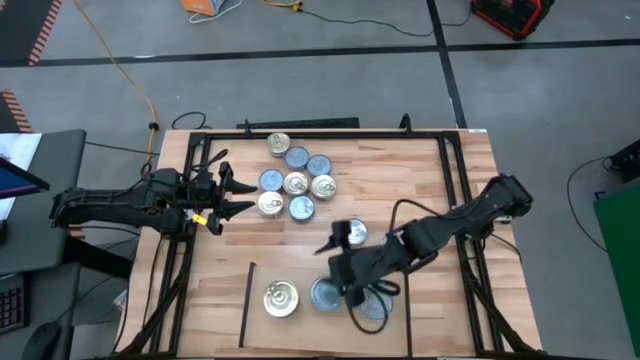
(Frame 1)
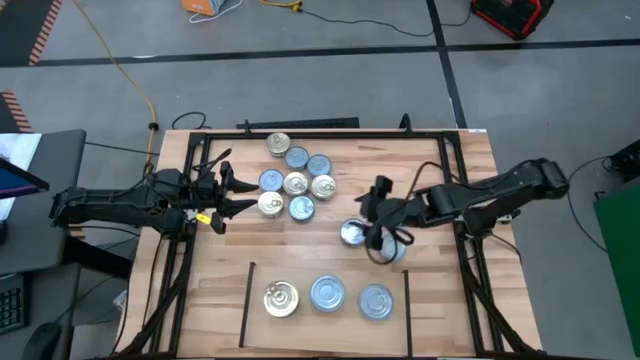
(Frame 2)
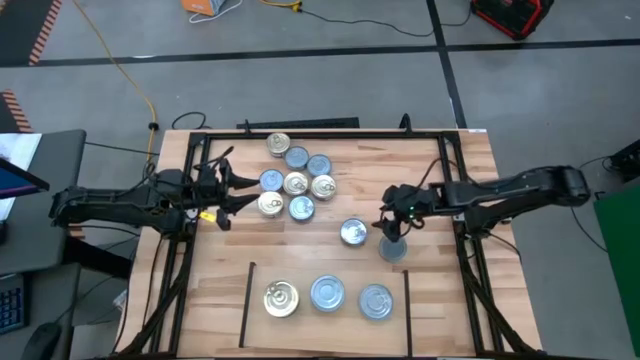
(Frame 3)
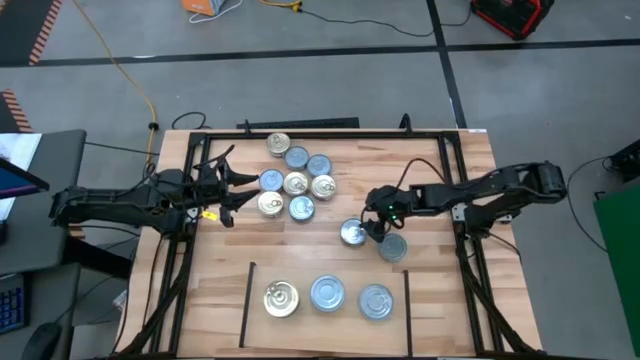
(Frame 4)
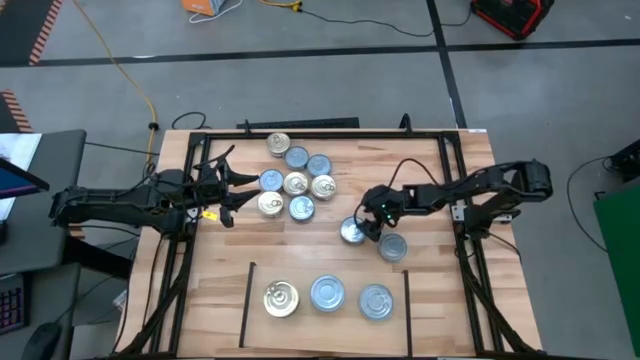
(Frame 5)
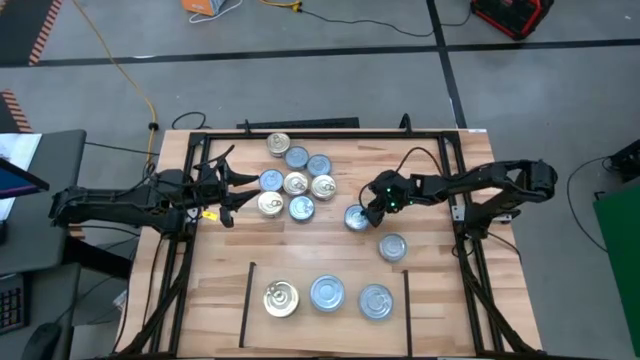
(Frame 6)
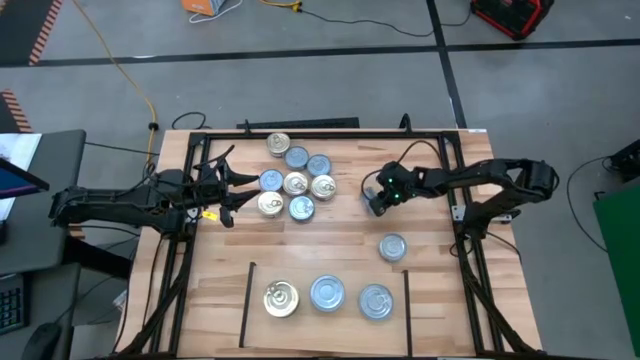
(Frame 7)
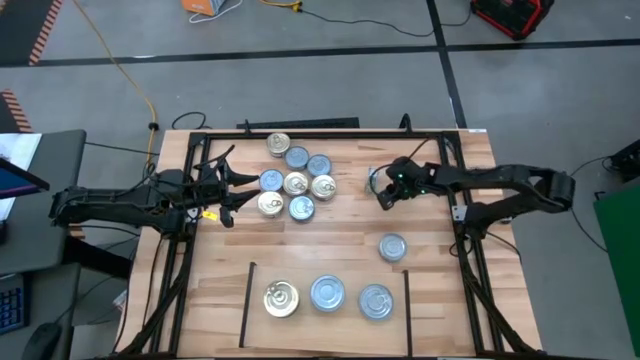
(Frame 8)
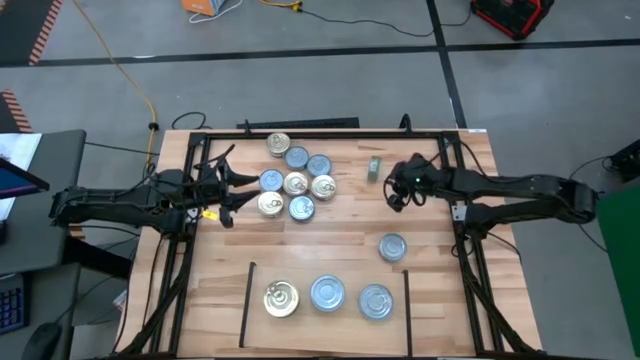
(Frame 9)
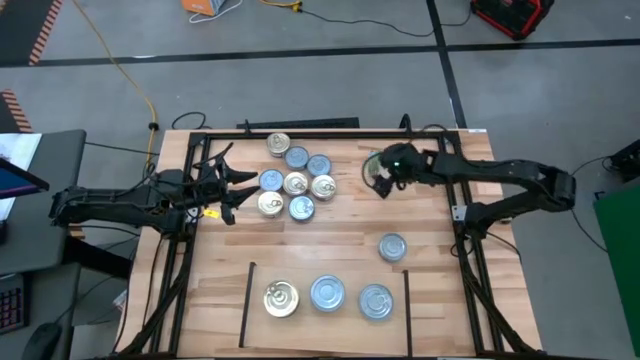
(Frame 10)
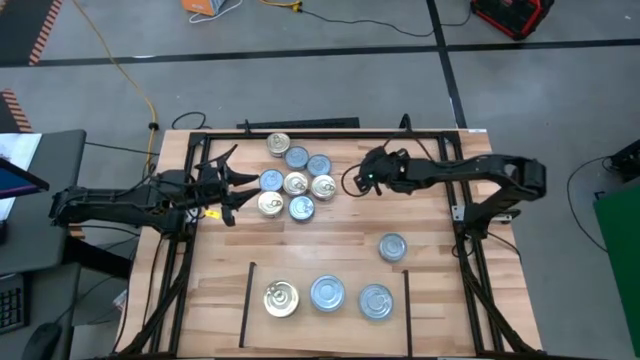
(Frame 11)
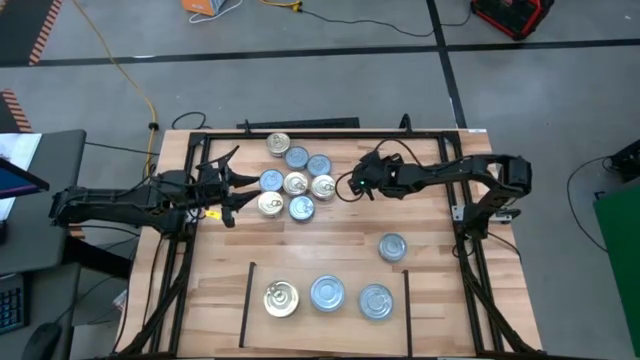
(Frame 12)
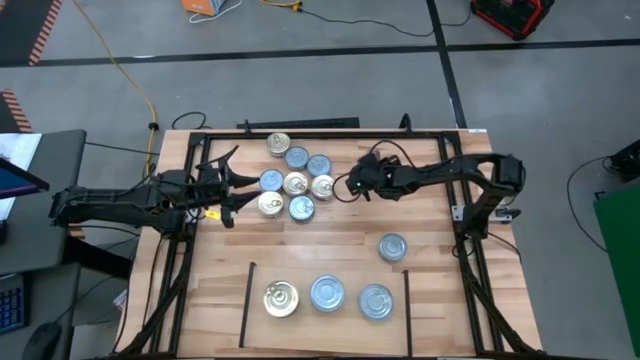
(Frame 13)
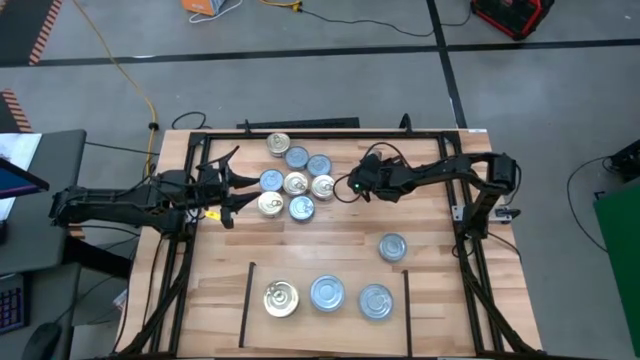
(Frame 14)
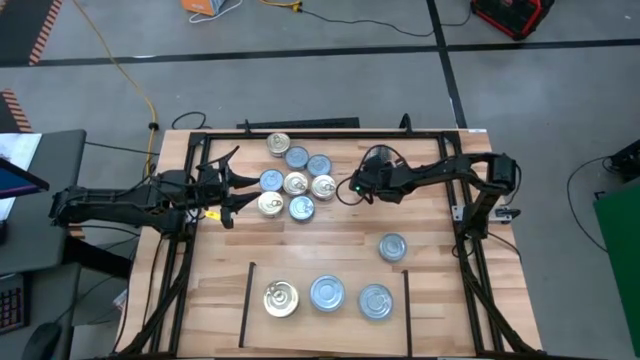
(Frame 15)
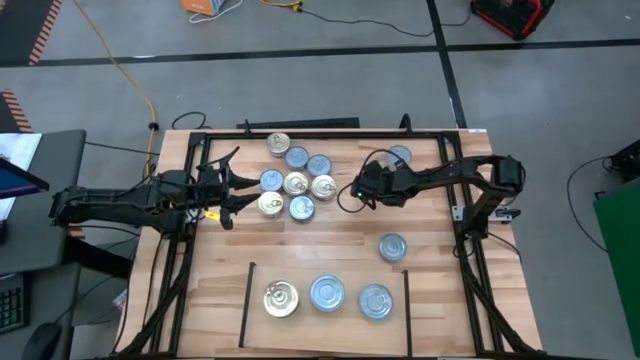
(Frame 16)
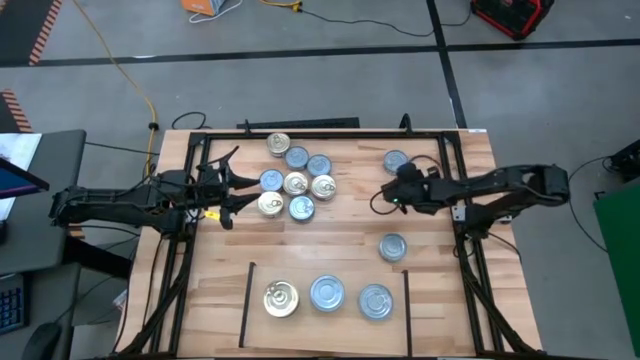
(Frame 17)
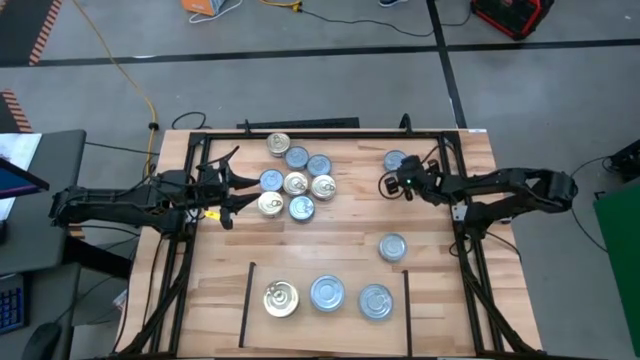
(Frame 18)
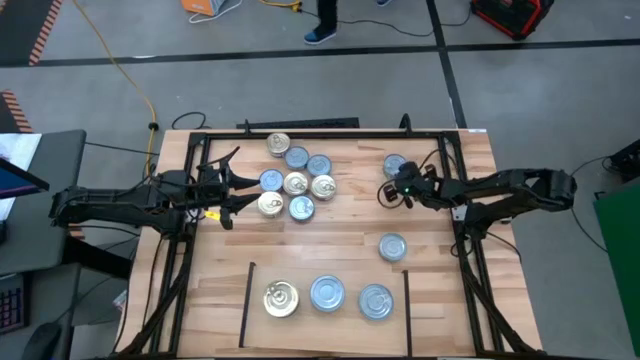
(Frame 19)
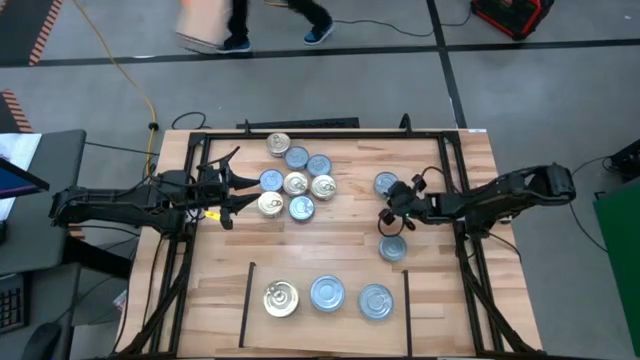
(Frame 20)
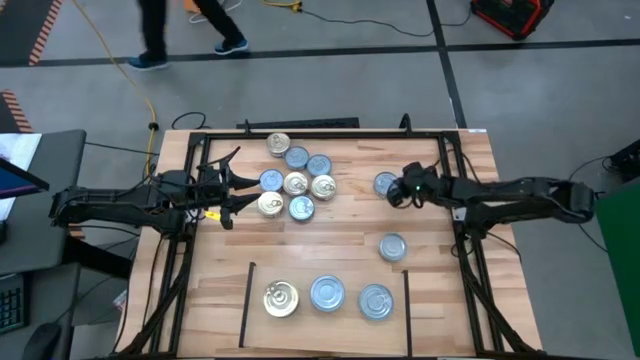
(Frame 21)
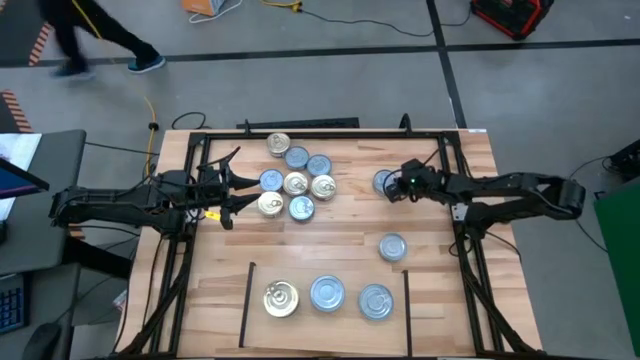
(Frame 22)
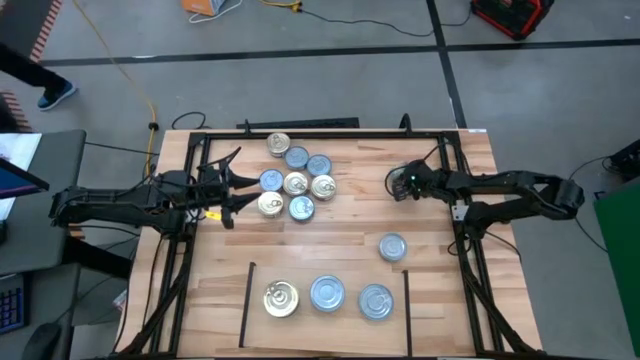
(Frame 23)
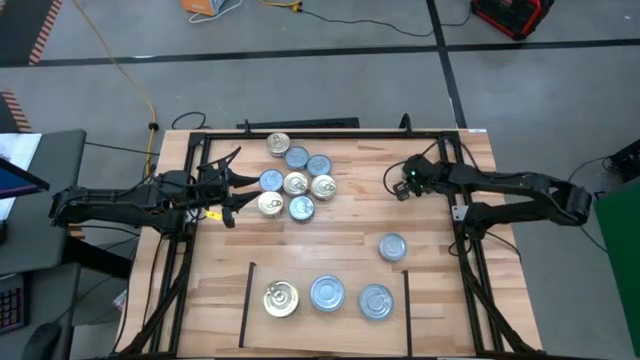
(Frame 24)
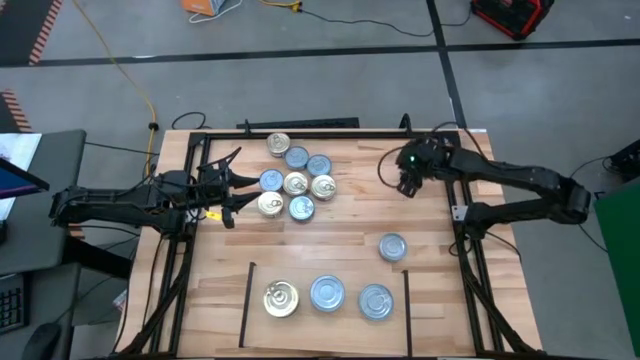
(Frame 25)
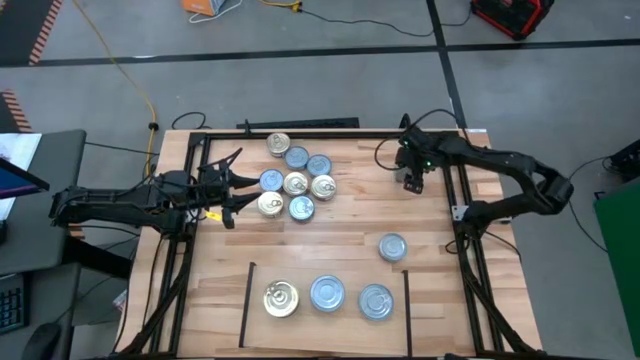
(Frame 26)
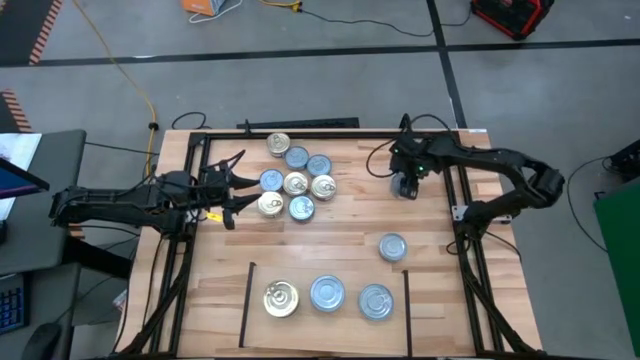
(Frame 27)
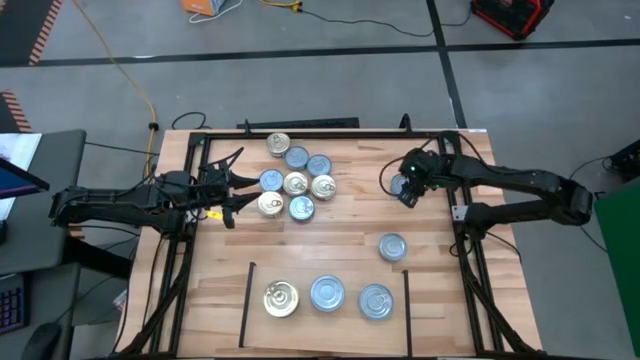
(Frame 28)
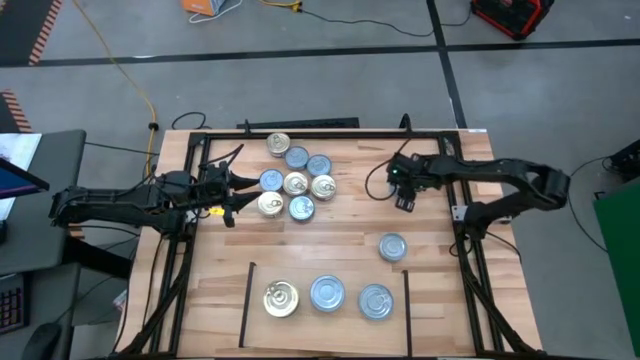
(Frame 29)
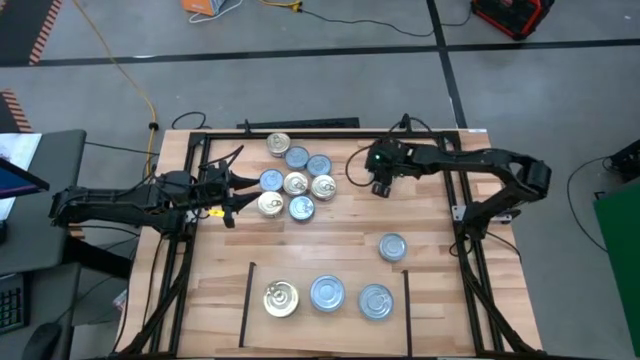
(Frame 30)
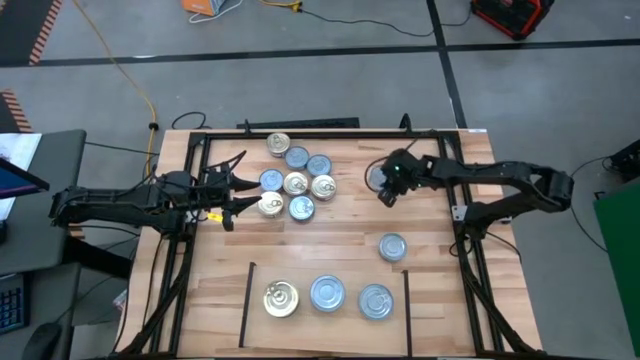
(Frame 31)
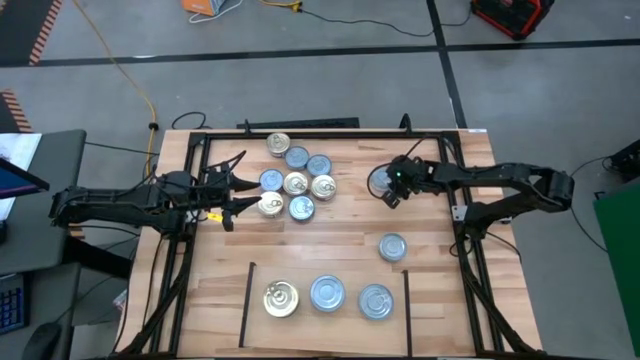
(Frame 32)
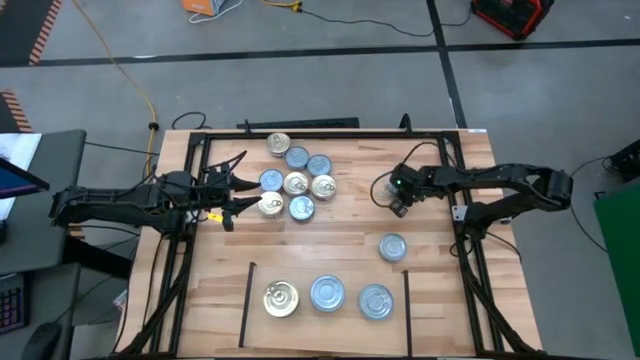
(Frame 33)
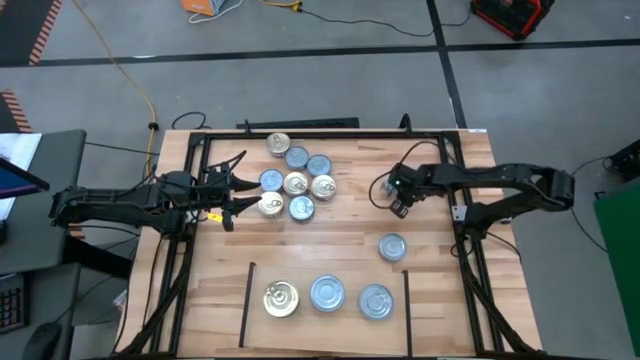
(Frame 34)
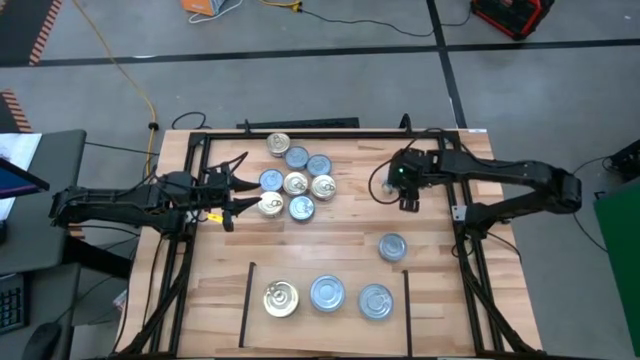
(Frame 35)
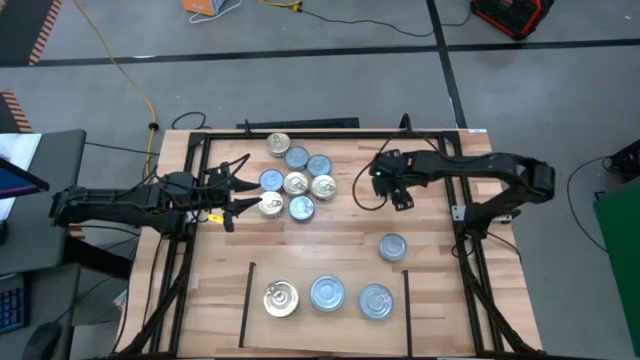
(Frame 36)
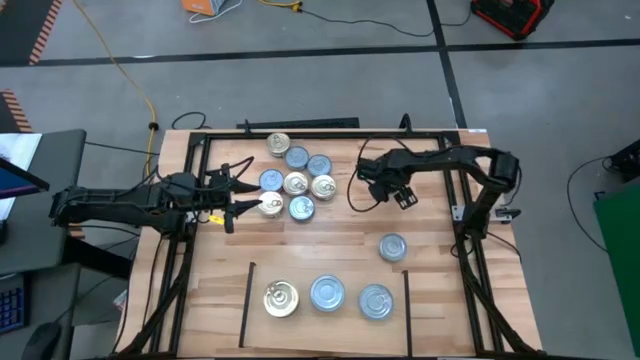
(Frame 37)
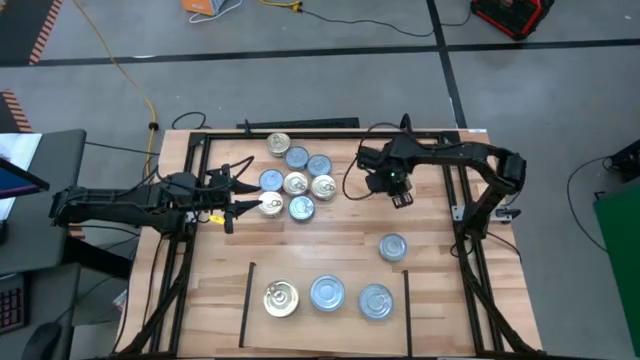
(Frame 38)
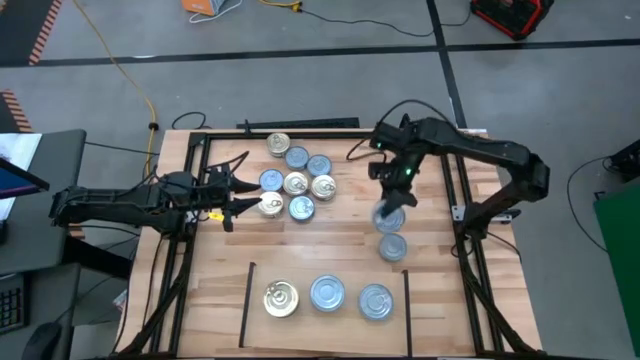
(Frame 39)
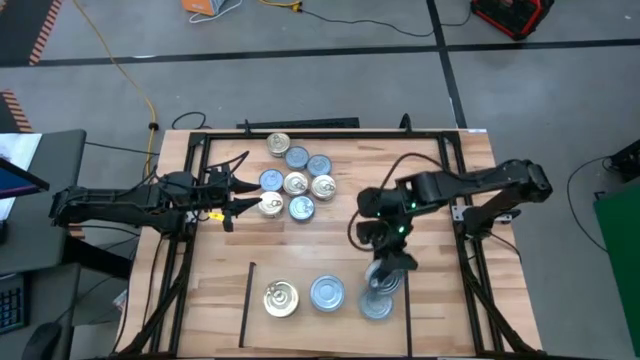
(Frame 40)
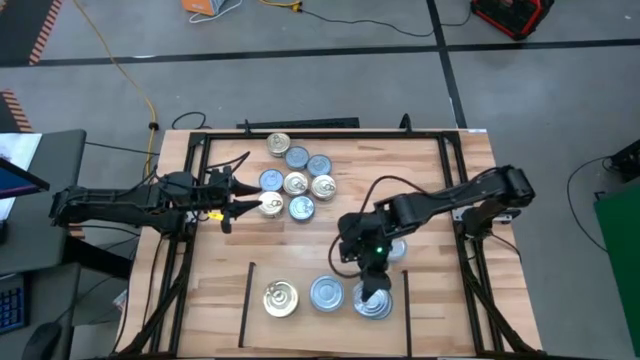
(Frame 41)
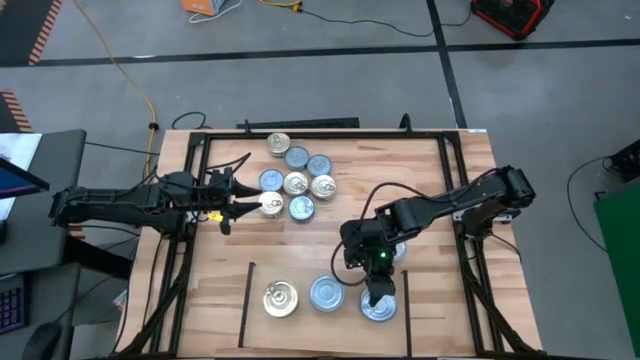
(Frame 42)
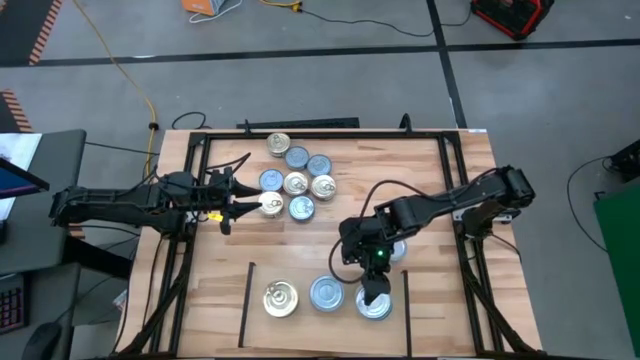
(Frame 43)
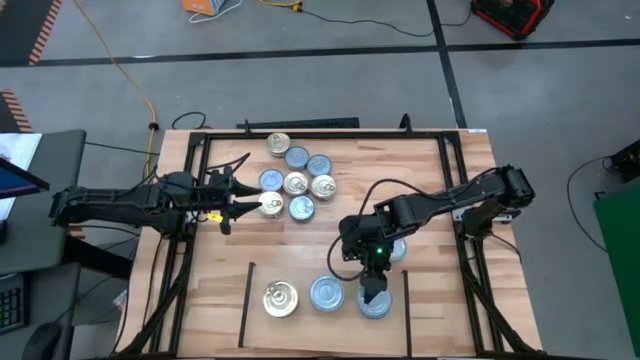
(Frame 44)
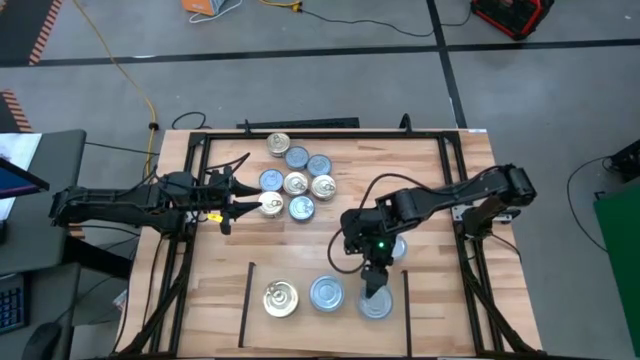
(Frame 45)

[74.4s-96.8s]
Task: Stack canned seafood by type on shelf
Put the green tuna can on the top of the yellow and blue tuna can on the shelf
